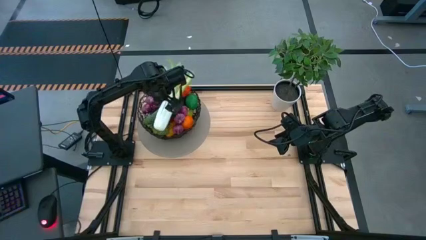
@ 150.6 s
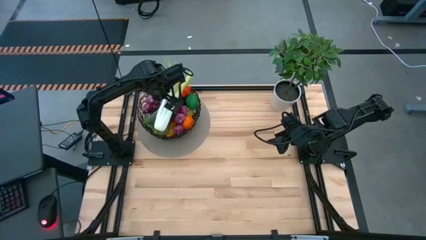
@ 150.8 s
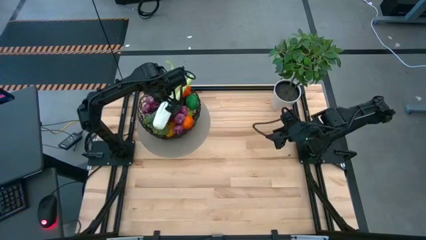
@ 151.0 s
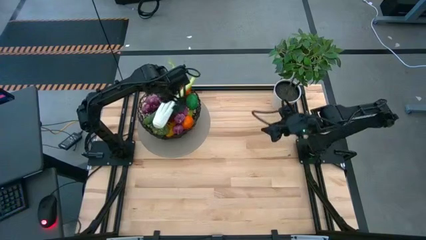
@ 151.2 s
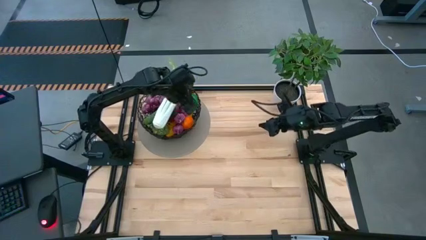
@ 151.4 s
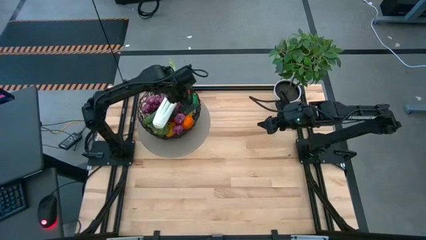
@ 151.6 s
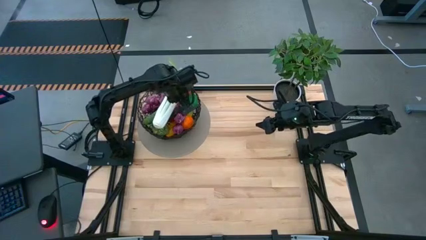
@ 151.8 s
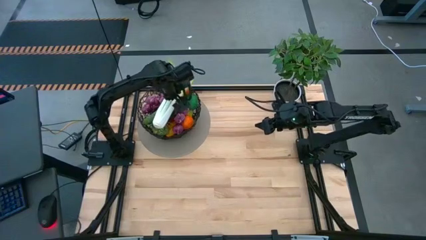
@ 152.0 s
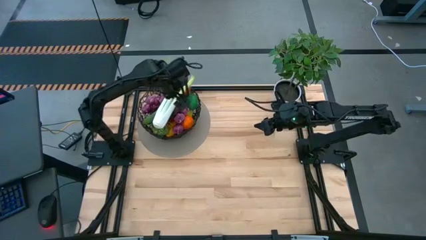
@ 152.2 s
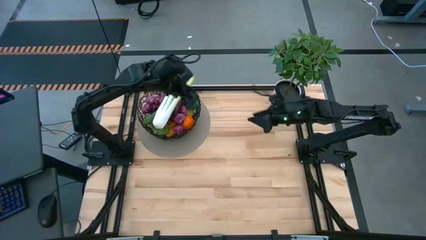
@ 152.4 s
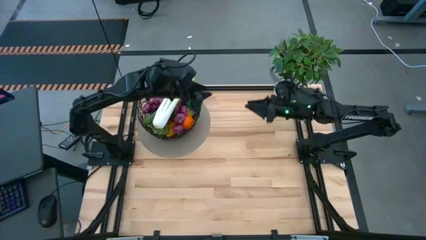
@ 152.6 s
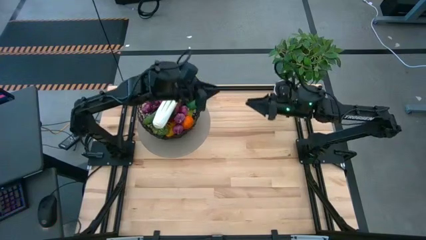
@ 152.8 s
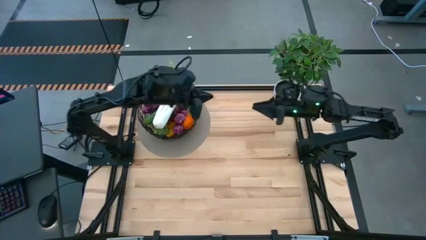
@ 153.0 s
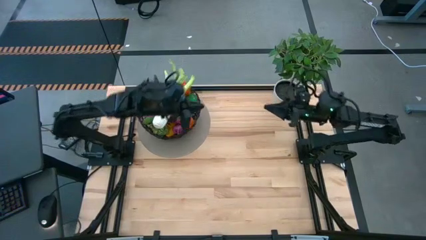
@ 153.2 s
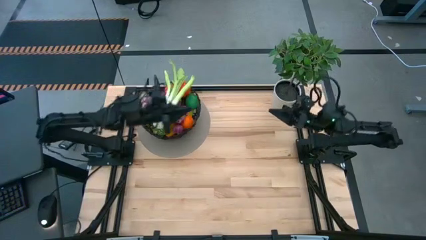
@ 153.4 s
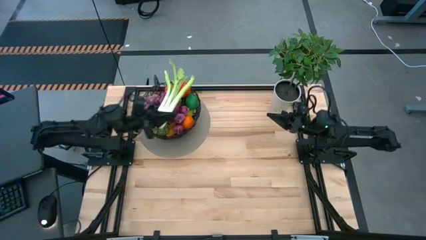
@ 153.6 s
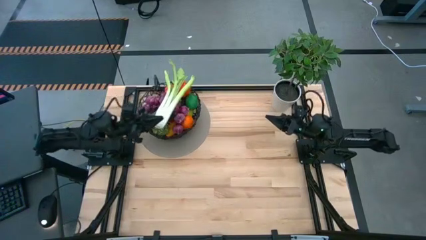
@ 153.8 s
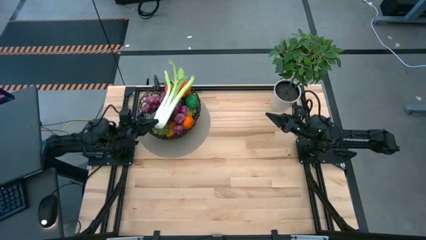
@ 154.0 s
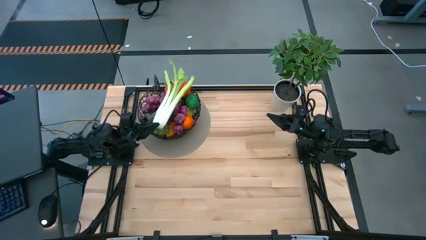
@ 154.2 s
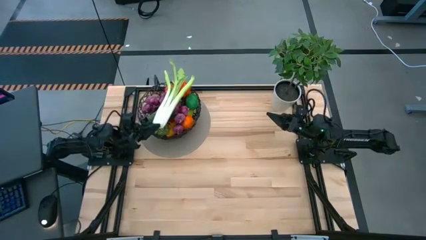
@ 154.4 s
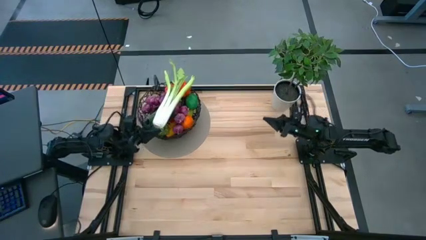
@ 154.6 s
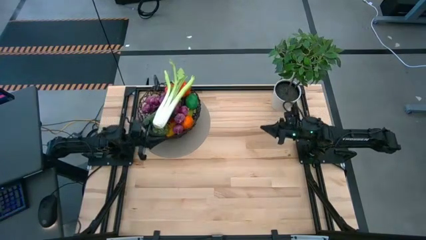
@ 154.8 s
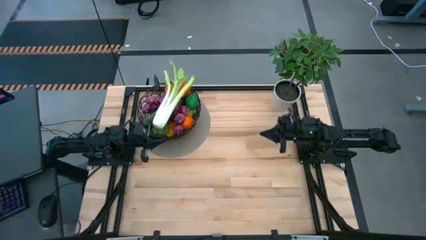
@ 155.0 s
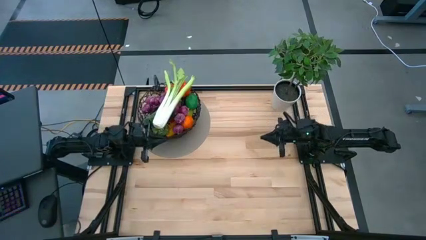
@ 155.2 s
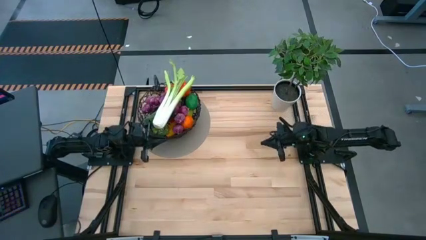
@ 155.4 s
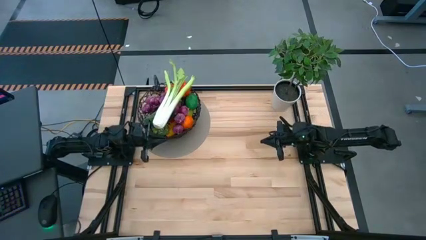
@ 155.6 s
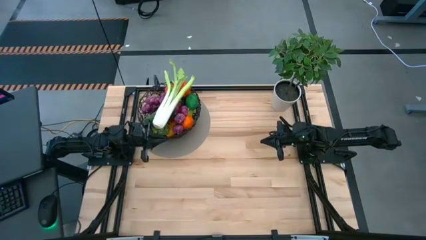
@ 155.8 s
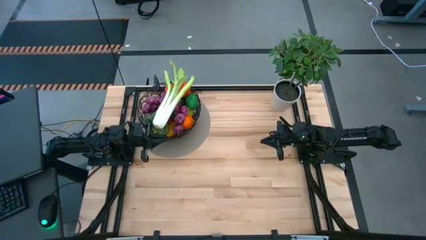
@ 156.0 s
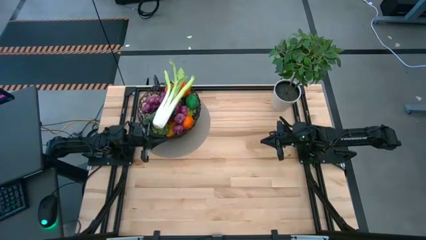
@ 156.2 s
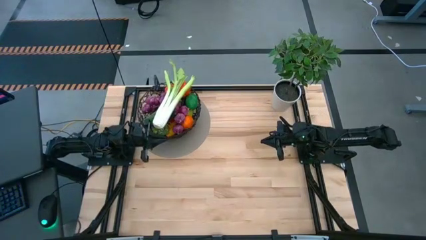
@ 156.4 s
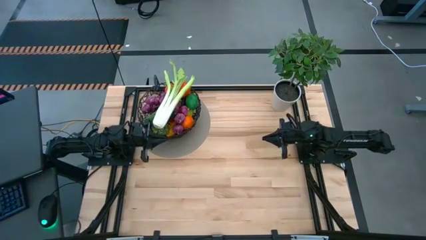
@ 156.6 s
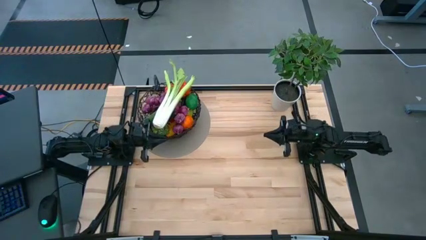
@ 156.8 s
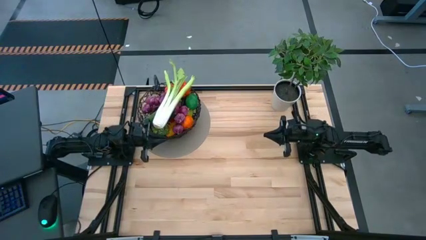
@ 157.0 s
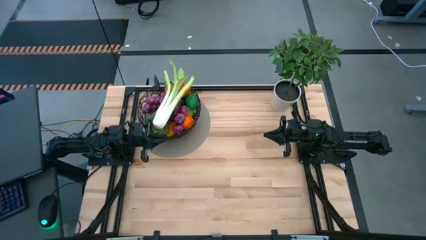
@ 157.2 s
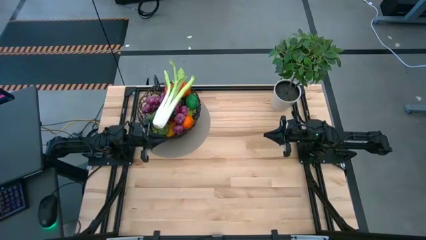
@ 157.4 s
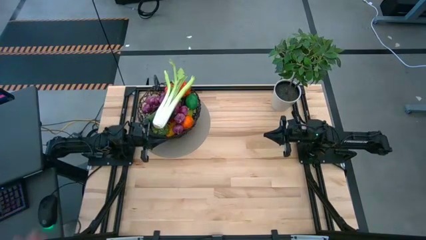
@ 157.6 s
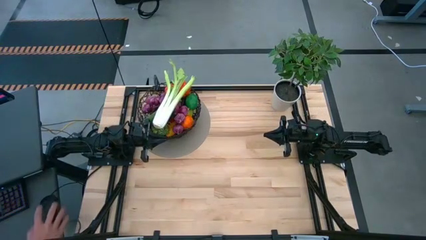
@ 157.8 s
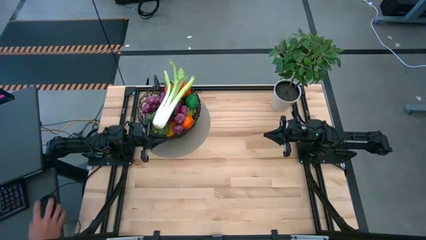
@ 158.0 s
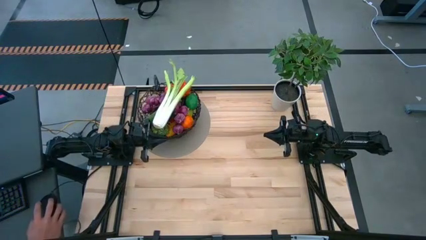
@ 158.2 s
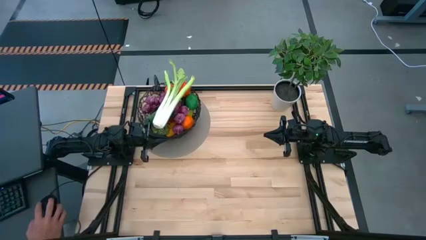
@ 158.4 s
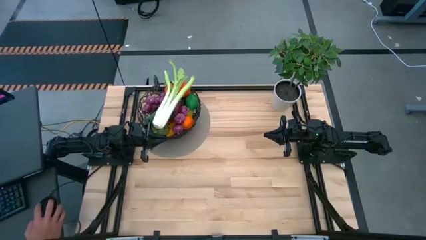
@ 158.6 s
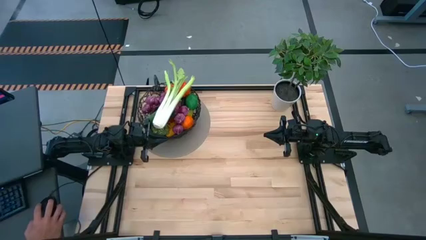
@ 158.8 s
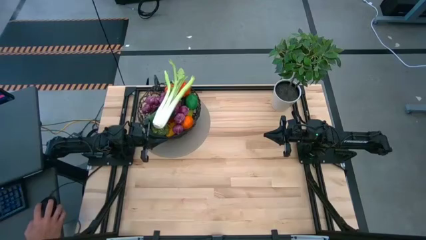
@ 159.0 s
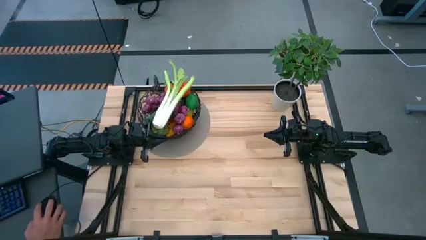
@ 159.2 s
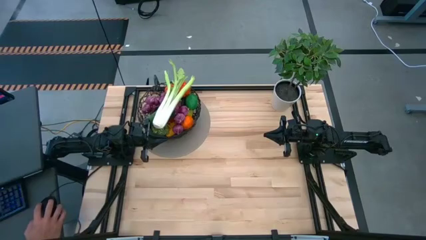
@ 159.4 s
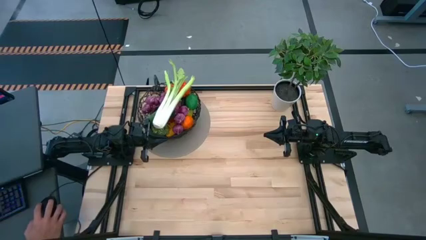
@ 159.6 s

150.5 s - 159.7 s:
Task: Build produce basket
Return to Home Position

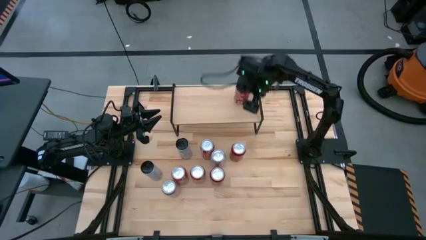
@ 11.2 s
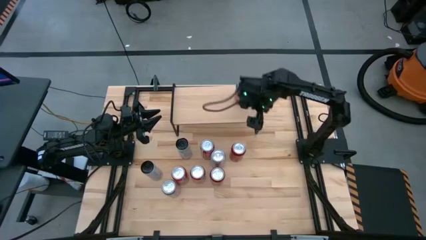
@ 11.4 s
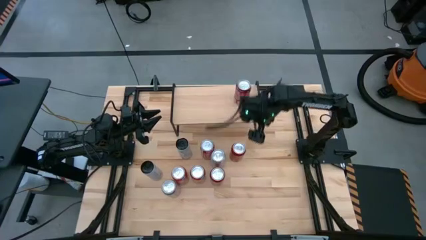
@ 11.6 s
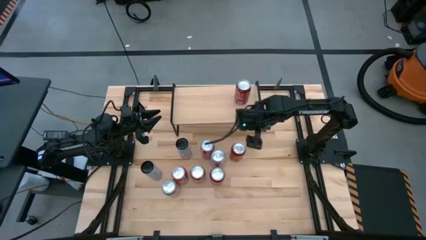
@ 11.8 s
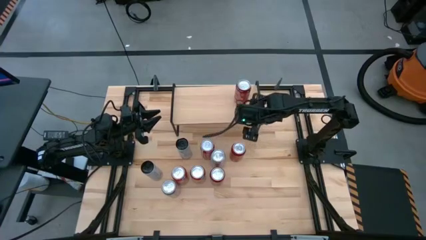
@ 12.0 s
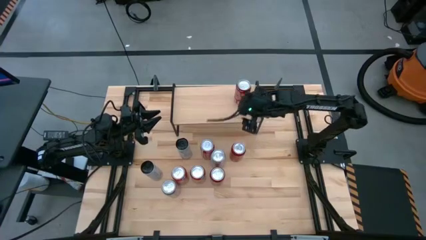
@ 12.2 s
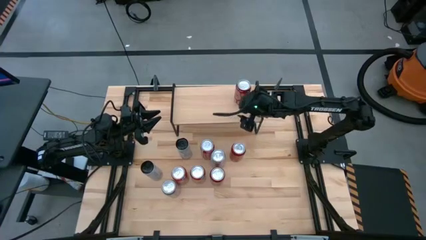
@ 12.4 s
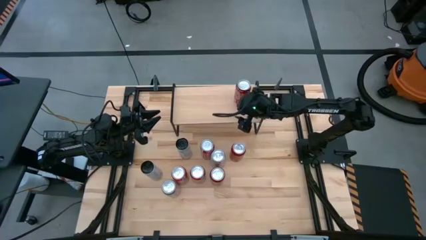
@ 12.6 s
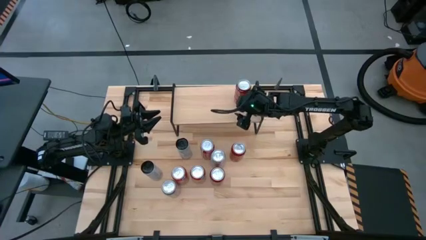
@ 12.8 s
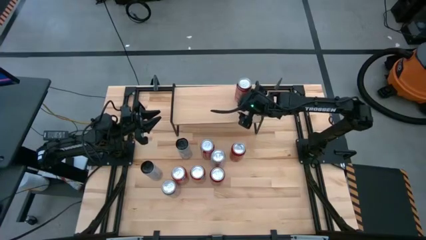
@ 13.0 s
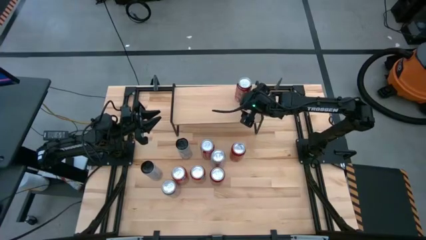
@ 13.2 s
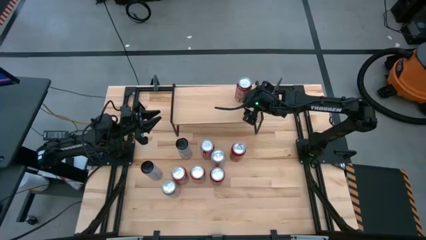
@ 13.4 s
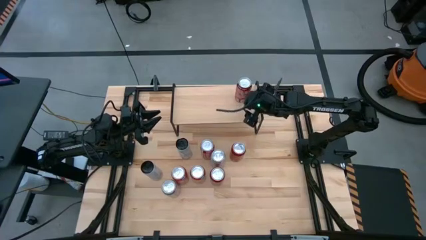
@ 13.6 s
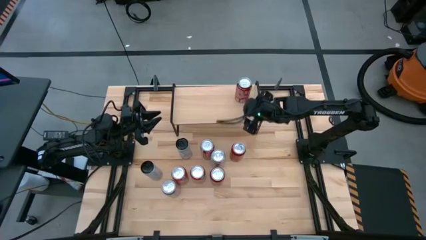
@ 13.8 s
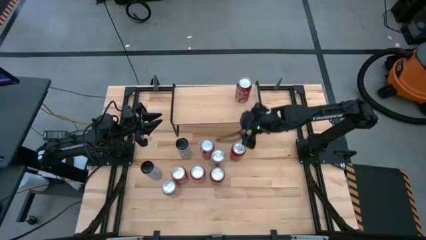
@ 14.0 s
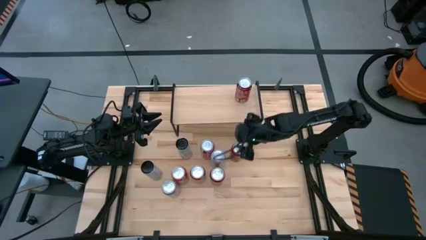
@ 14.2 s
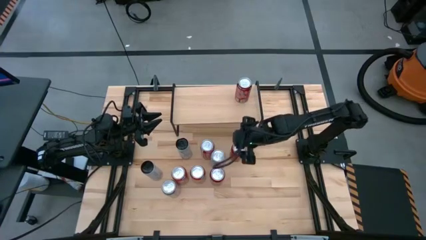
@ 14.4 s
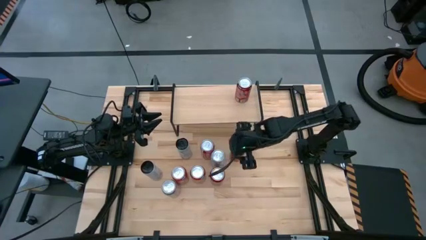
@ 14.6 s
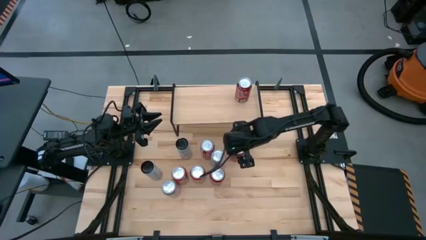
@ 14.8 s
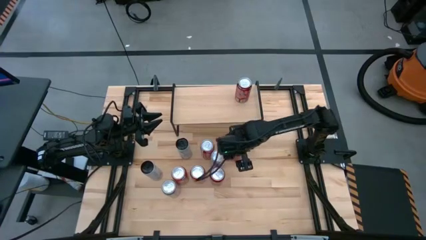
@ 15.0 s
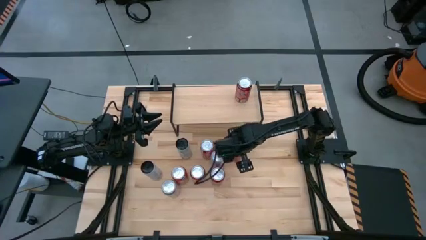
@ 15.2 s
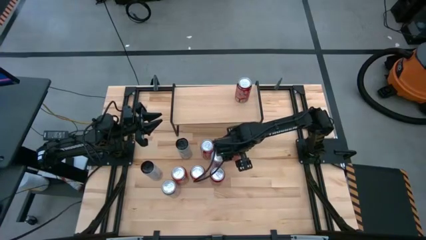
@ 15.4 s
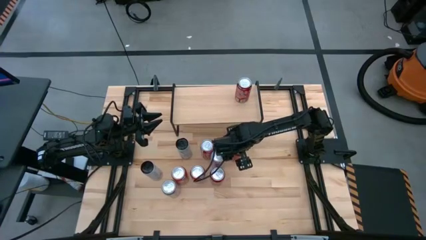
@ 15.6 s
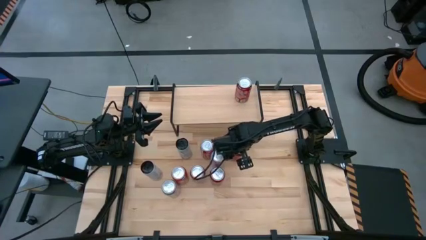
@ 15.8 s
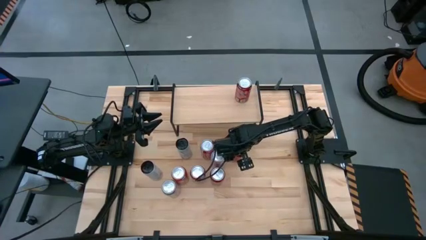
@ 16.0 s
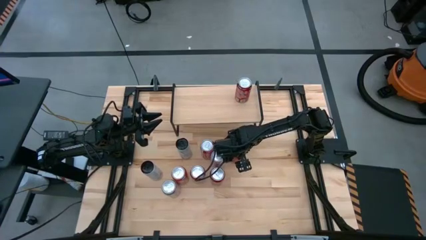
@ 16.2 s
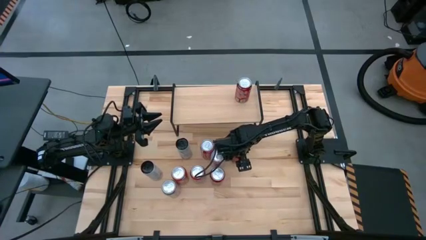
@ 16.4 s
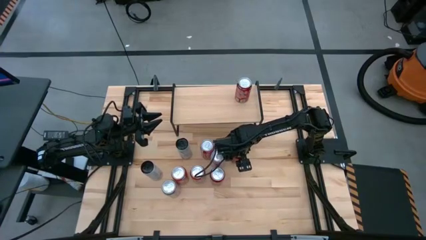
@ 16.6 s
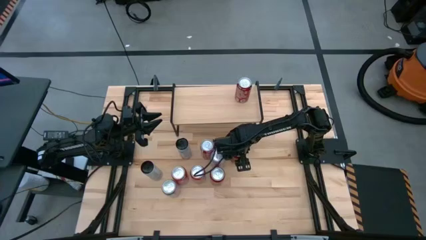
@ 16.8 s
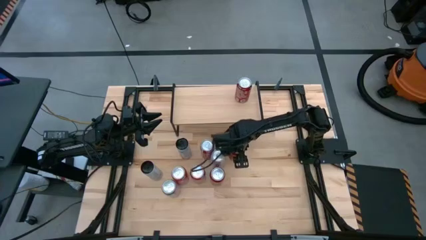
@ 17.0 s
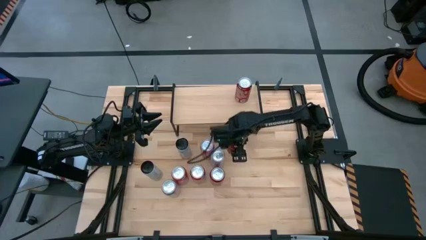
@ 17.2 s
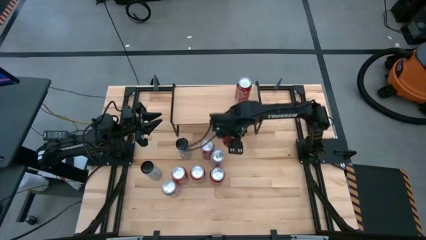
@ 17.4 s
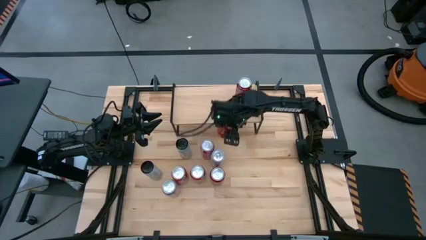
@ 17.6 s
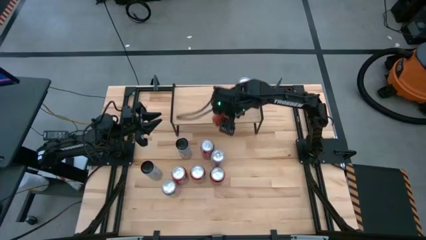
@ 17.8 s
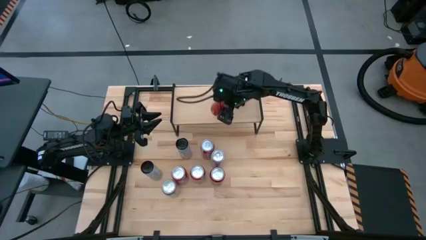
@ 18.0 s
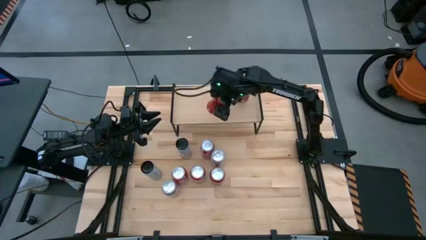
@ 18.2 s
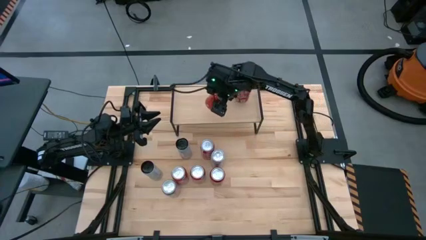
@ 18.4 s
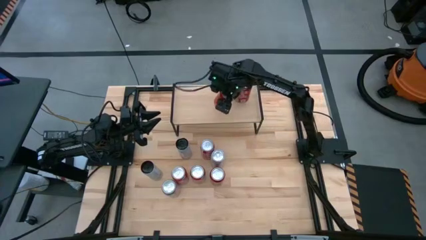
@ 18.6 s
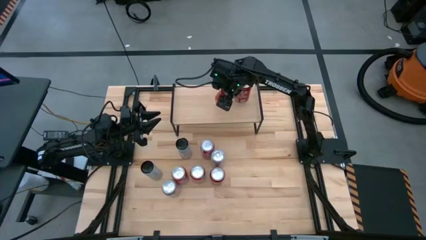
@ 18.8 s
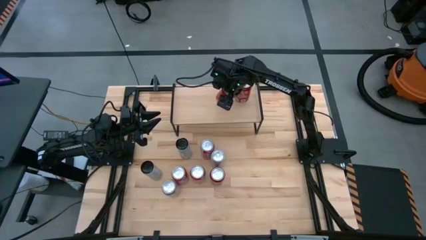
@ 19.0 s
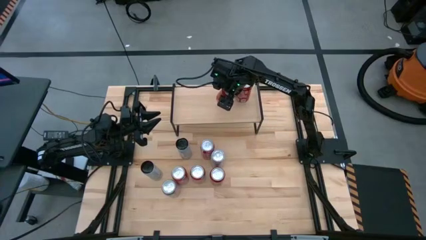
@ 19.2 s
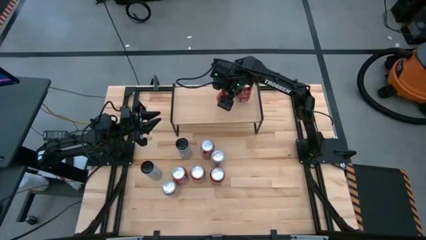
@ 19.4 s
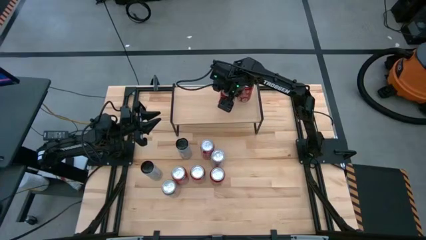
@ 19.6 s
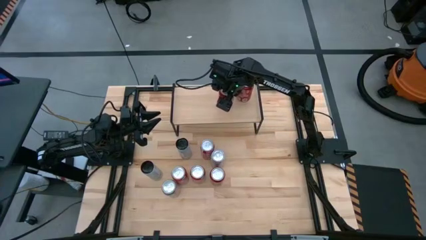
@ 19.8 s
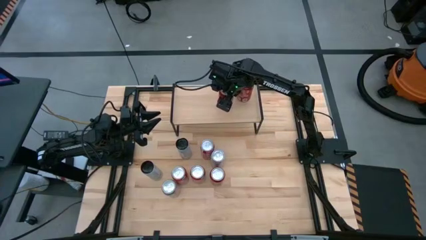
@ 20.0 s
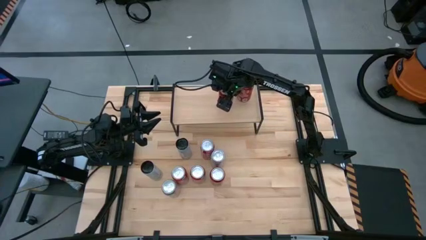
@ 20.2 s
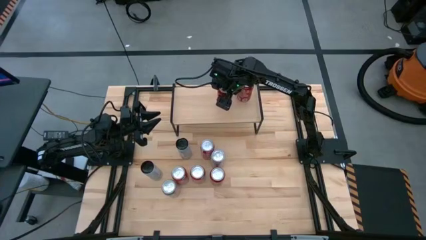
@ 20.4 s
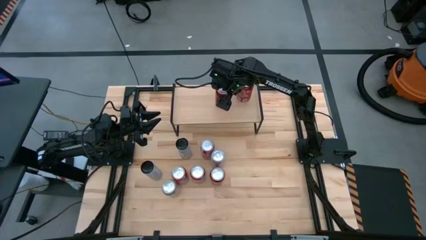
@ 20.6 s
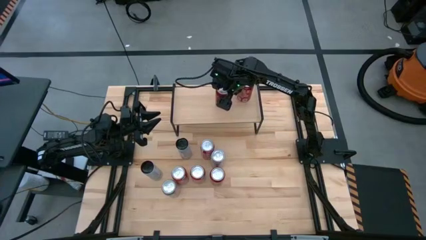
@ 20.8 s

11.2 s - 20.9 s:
Task: Place canned beverage on shelf
Put the red soda can on the shelf aligned with the other red soda can
